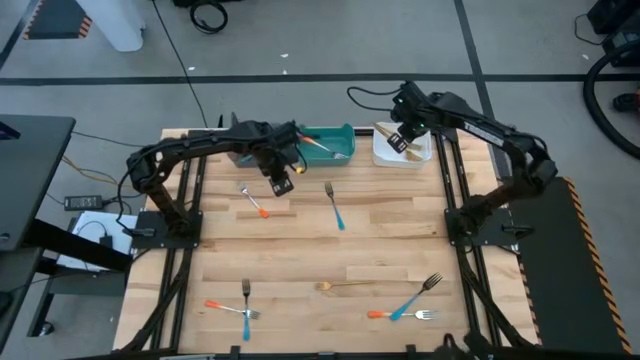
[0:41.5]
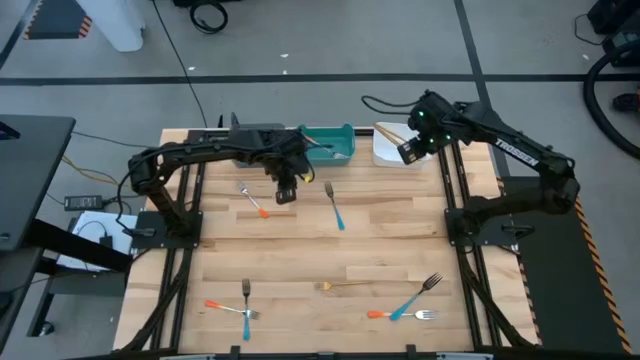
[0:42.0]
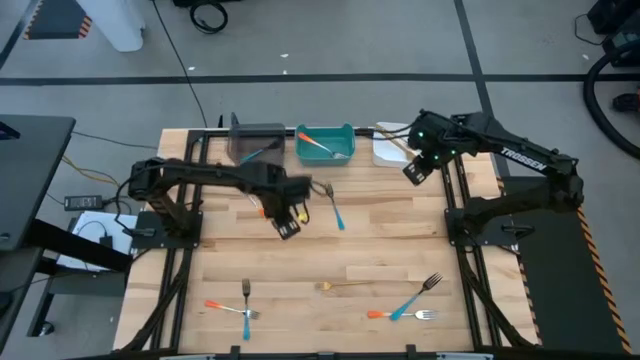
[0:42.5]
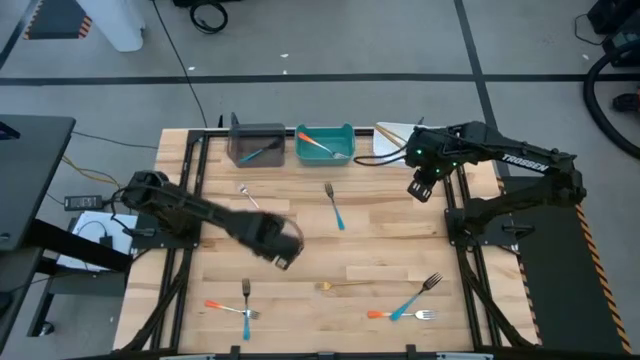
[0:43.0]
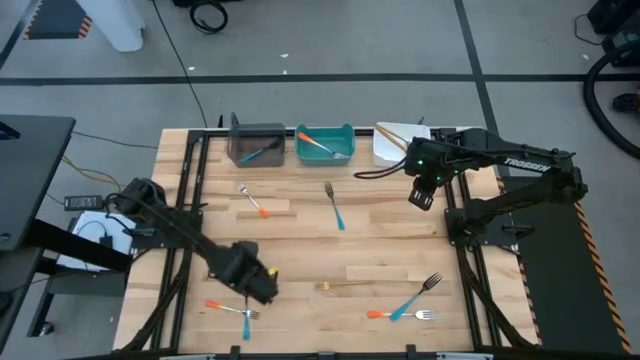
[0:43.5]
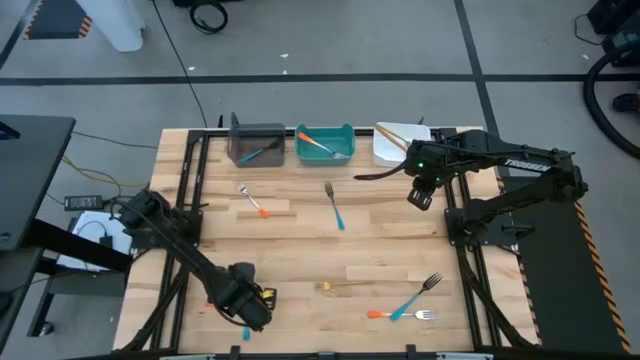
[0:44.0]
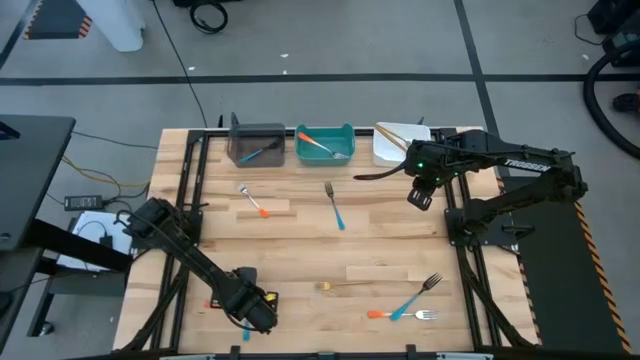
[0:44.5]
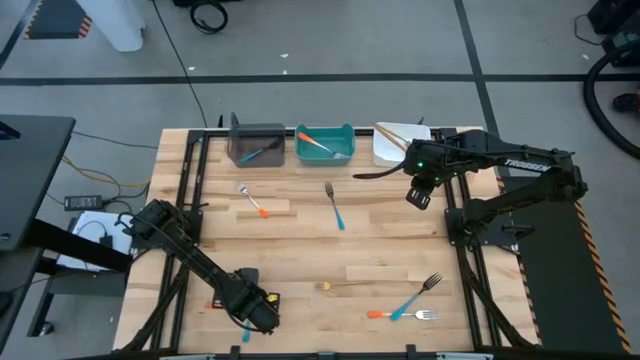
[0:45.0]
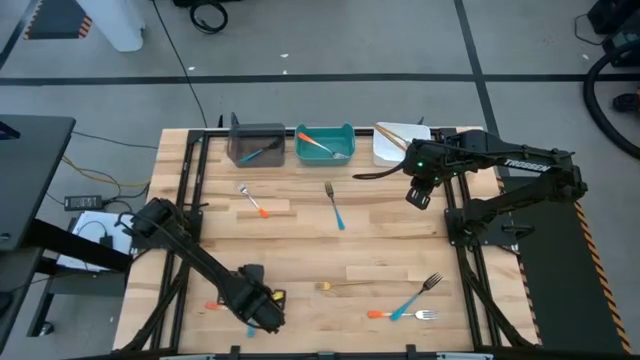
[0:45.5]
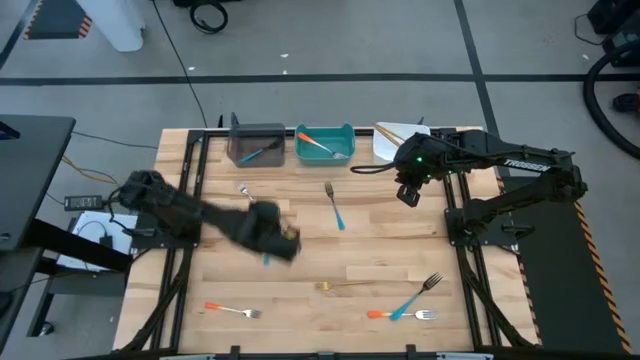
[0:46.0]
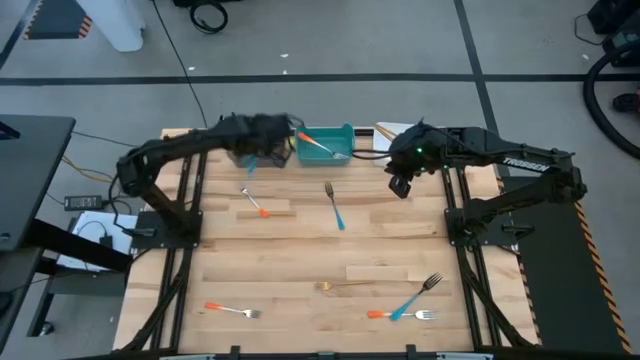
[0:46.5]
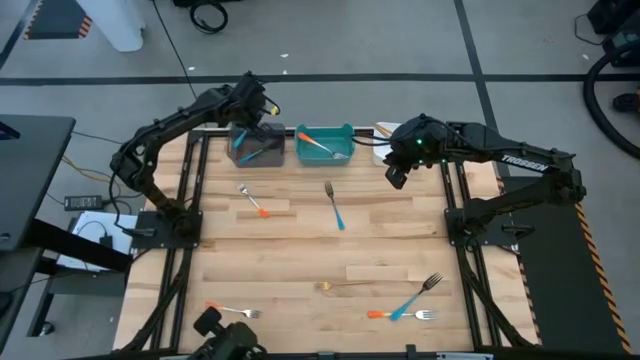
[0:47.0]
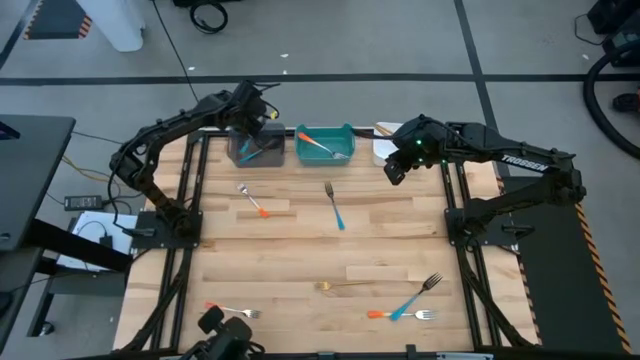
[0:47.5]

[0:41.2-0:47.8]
Task: Sort silverware by color (type)
Put the bottom left blue fork into the black bin

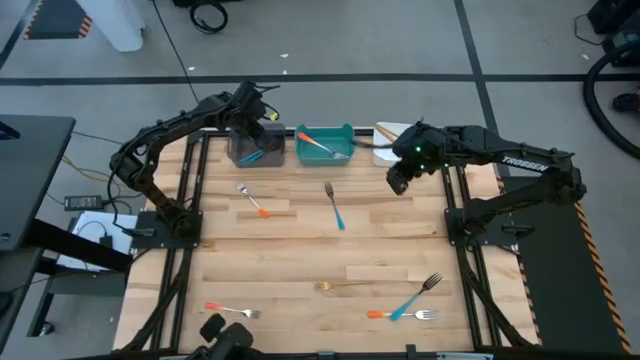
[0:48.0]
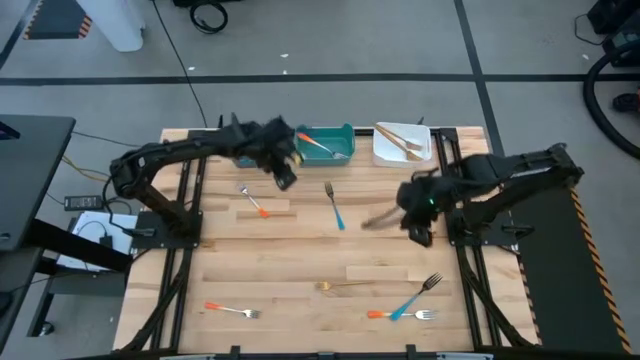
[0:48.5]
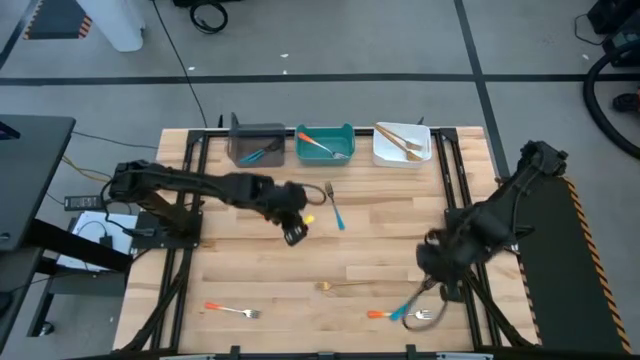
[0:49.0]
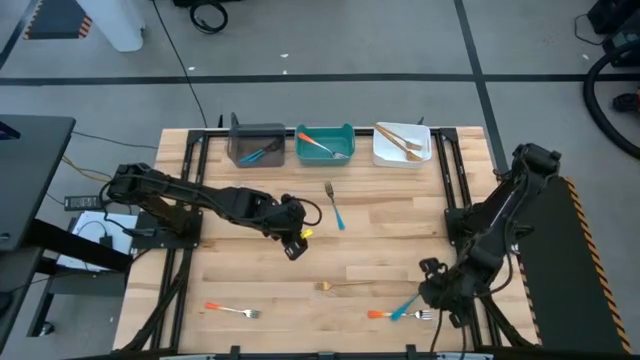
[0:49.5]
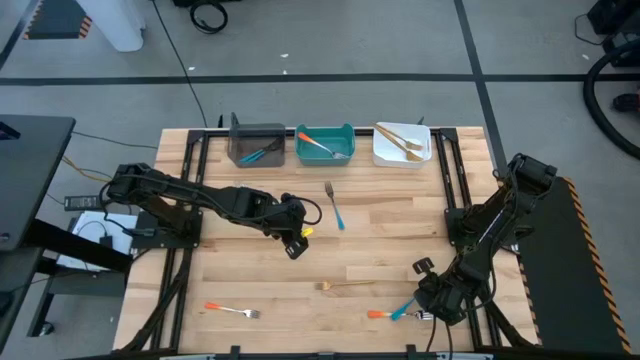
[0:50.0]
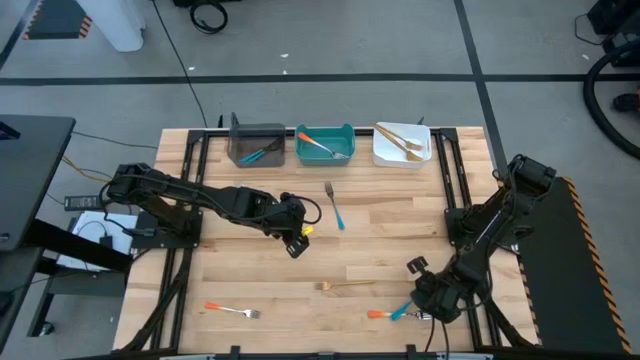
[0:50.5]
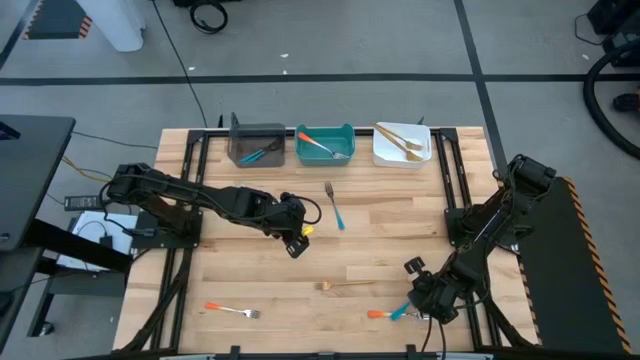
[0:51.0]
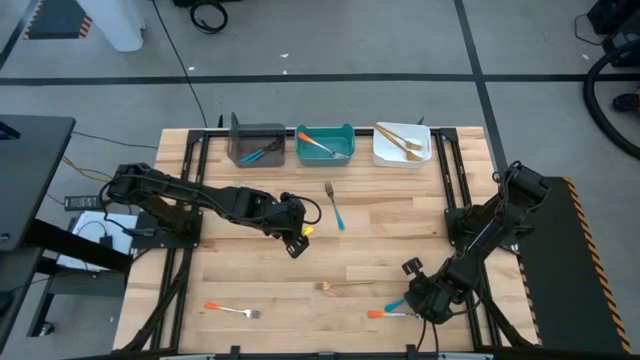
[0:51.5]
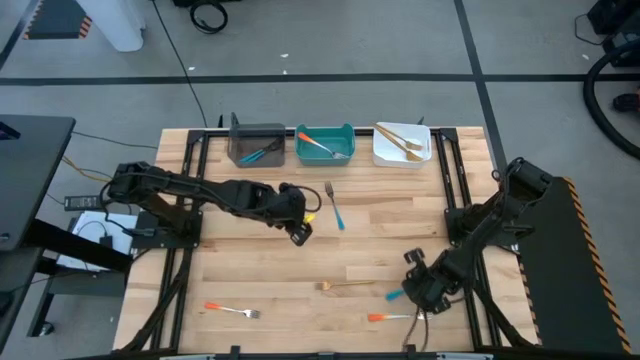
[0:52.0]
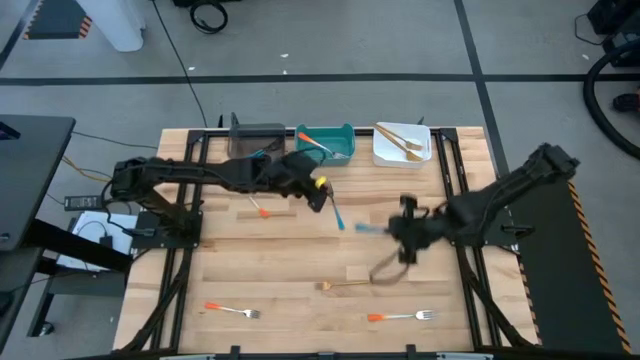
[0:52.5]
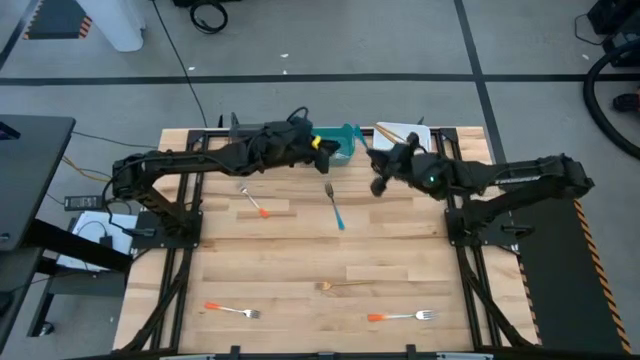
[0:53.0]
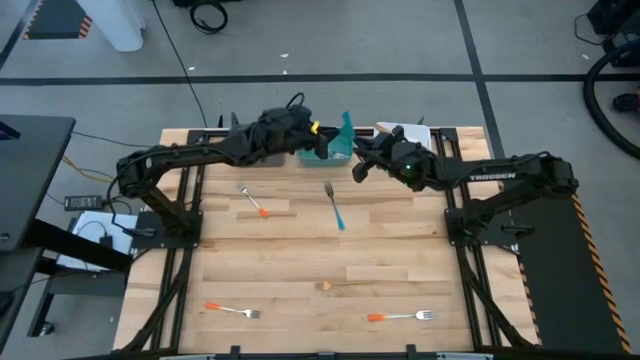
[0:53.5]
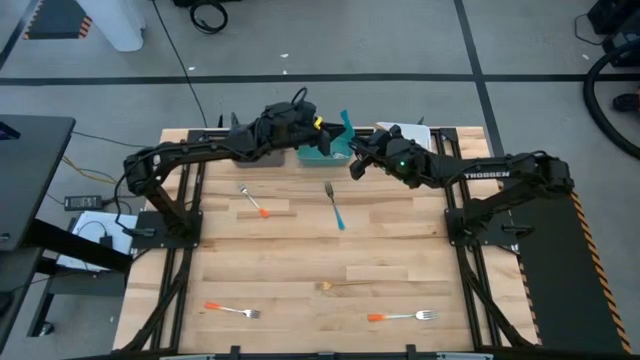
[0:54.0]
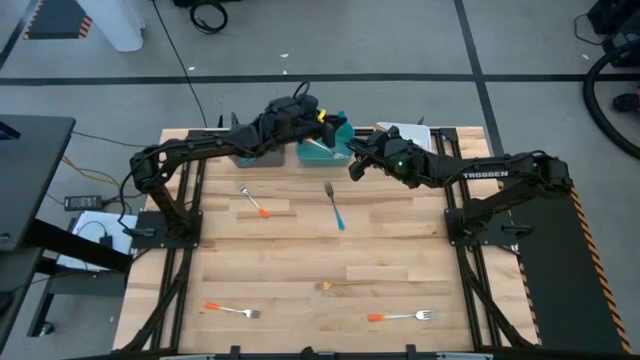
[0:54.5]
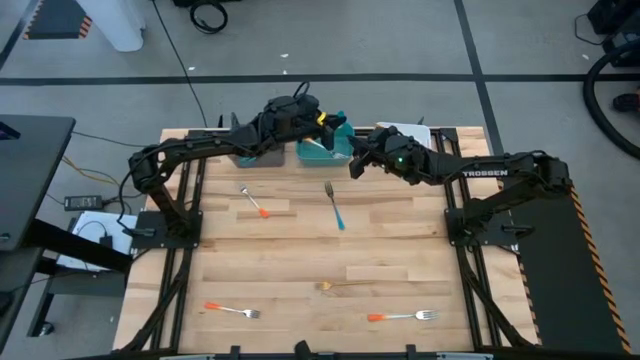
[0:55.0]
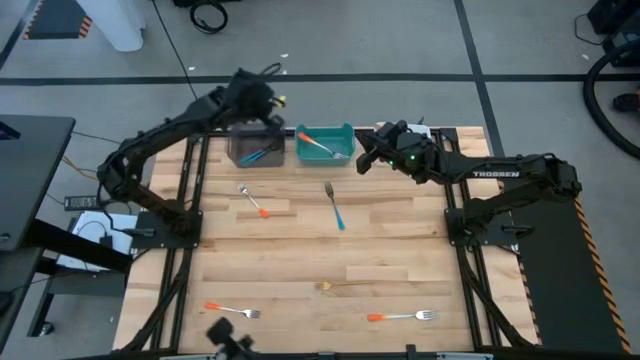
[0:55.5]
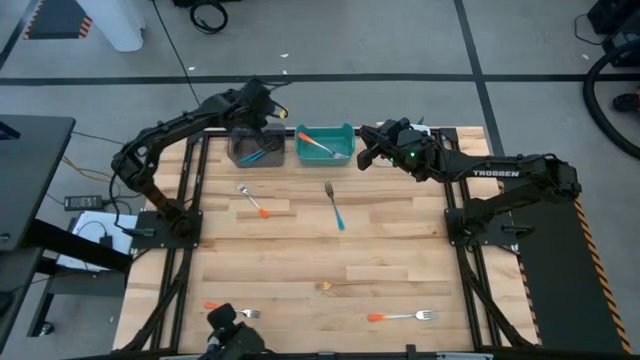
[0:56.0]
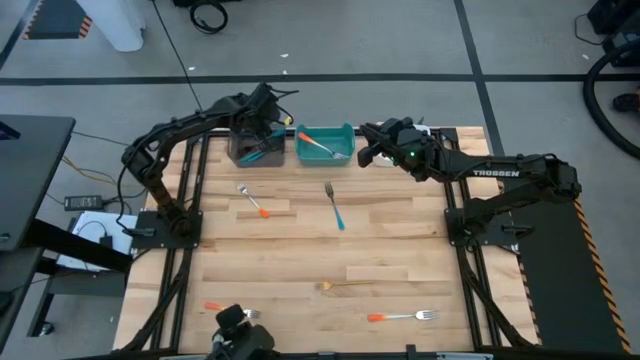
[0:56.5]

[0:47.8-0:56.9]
Put the bottom blue fork into the black bin

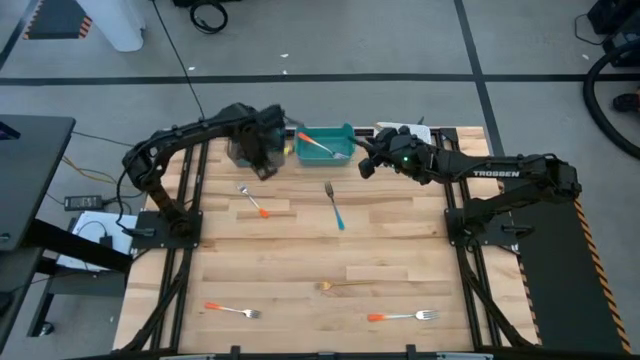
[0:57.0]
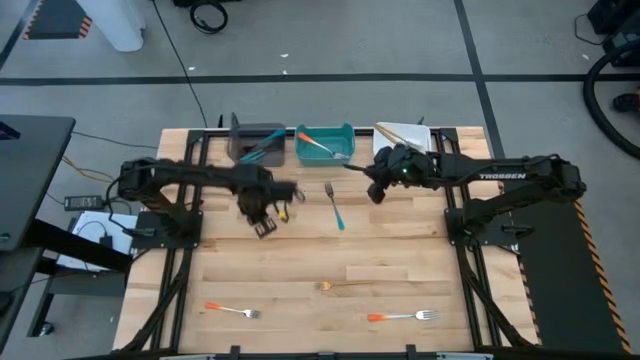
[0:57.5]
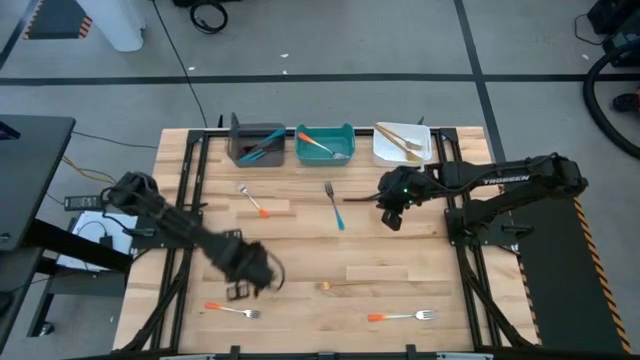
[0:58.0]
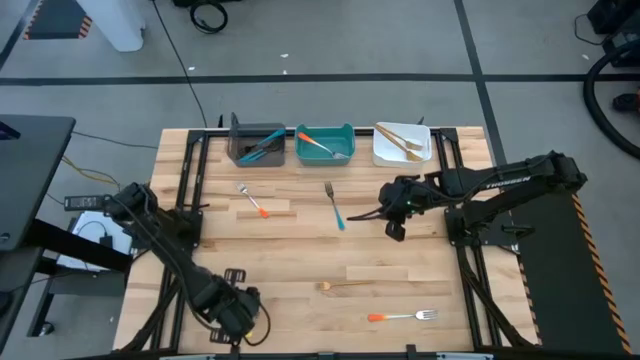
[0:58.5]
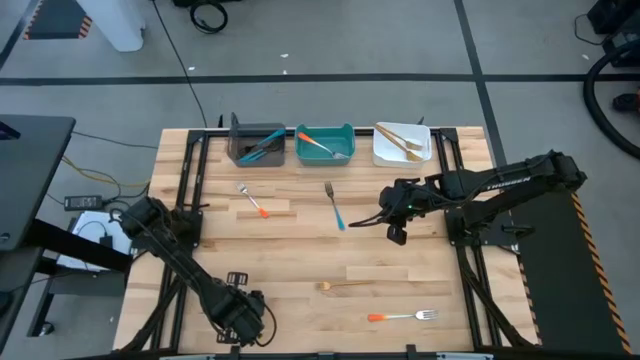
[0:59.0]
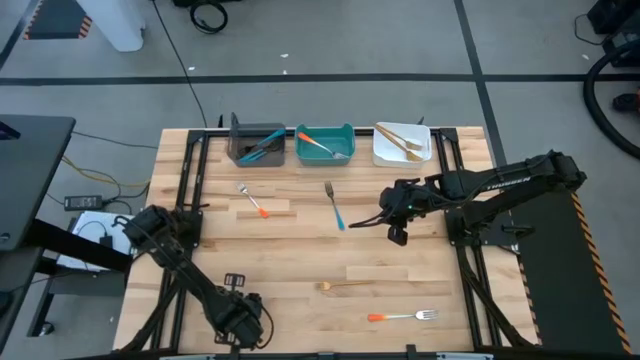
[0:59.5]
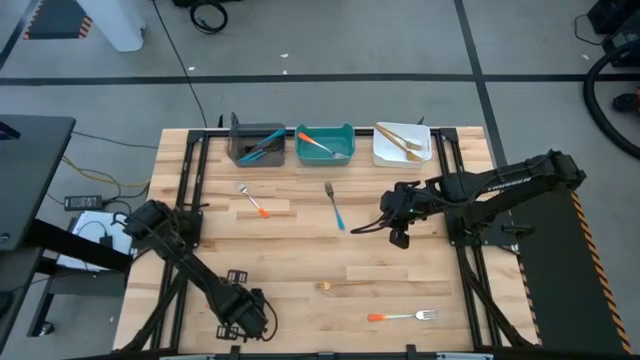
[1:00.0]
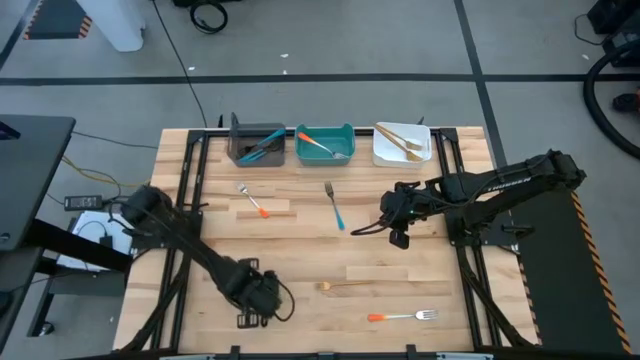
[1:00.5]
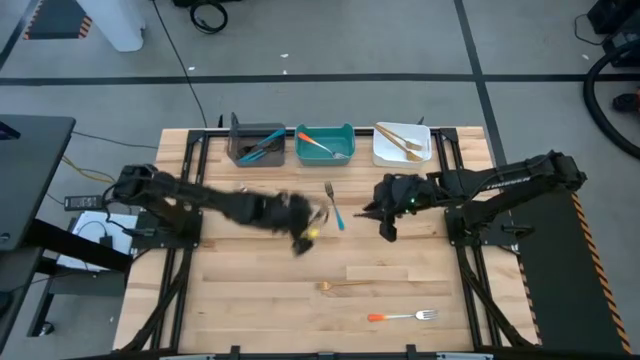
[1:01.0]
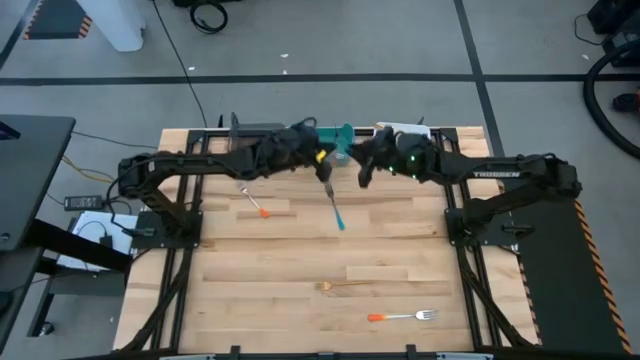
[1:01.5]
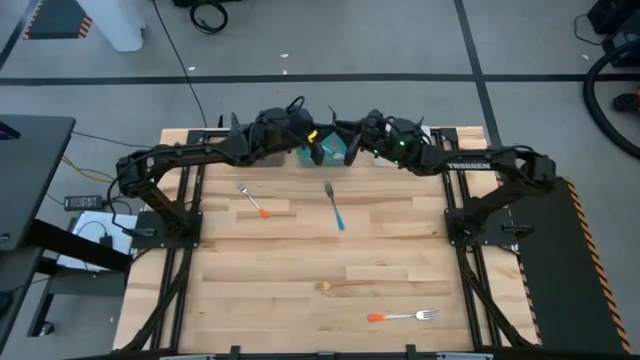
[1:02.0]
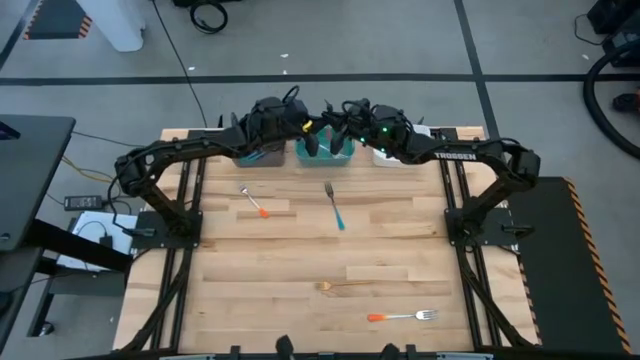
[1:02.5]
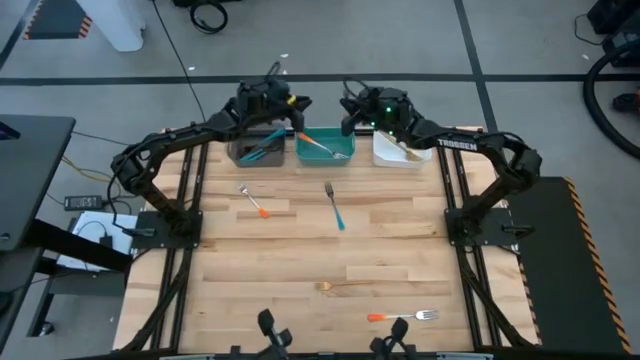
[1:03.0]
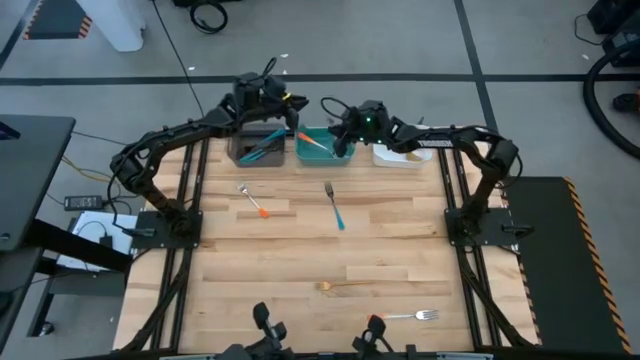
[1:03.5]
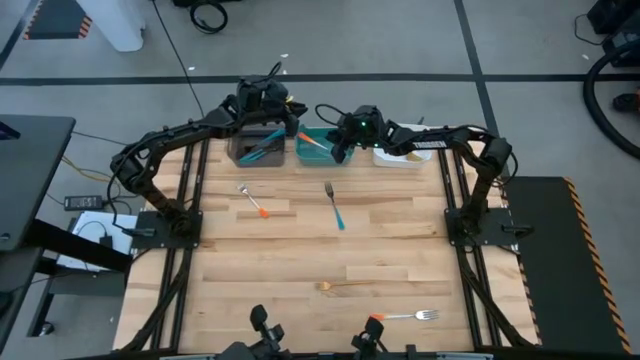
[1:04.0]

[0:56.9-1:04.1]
Put the bottom left orange fork into the blue bin
